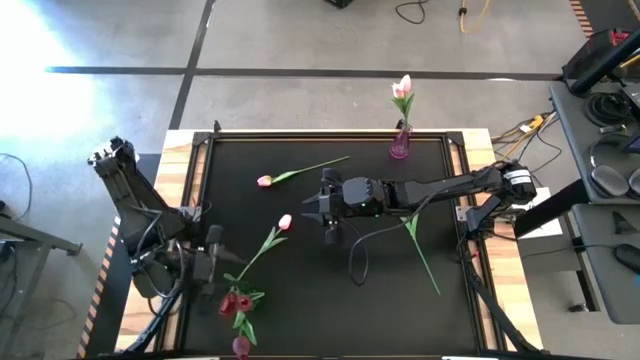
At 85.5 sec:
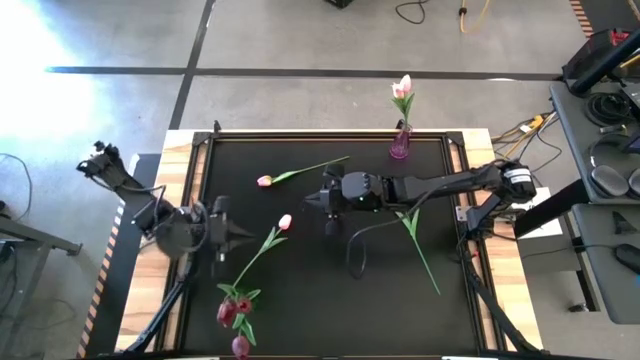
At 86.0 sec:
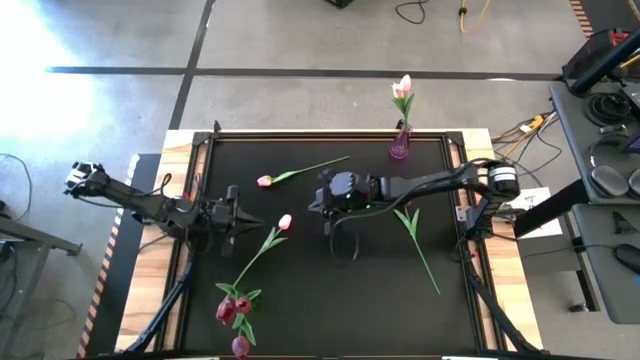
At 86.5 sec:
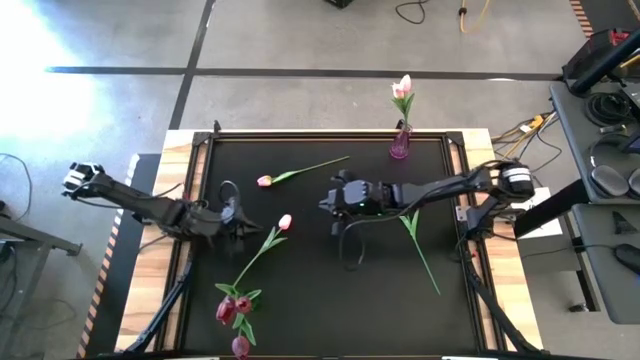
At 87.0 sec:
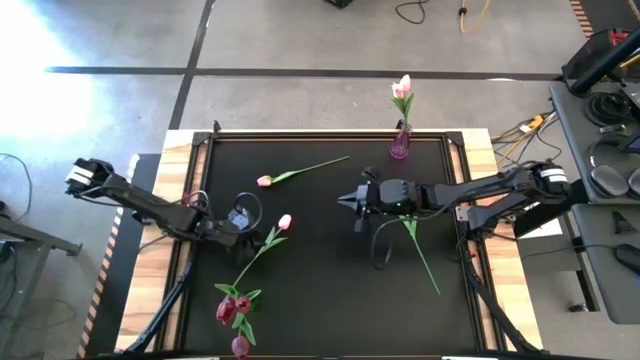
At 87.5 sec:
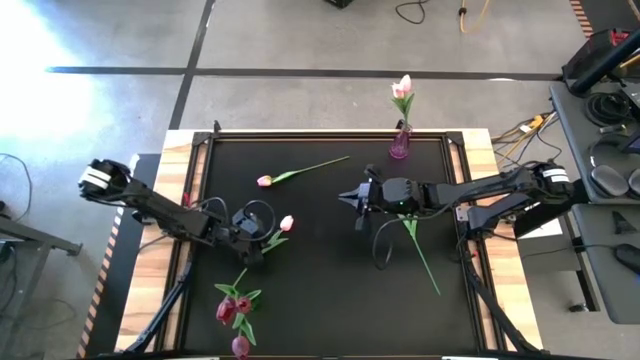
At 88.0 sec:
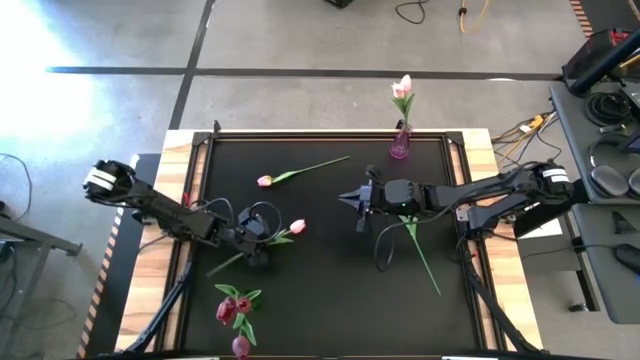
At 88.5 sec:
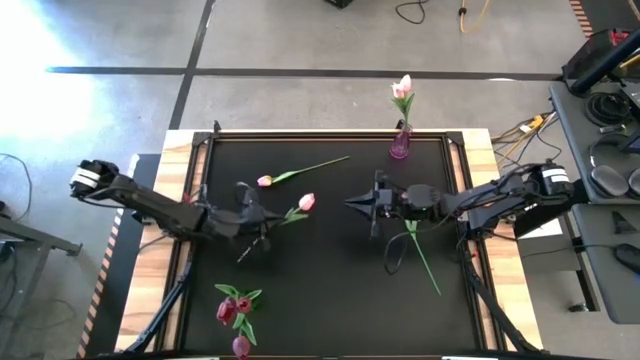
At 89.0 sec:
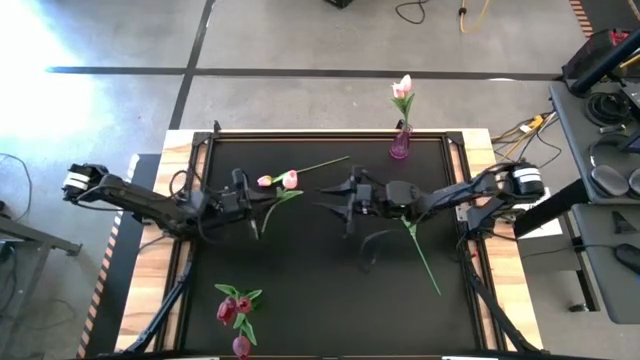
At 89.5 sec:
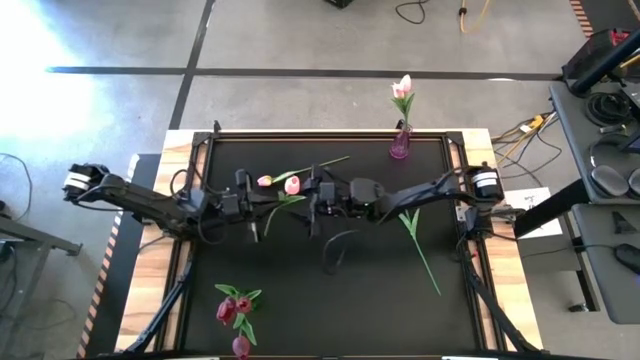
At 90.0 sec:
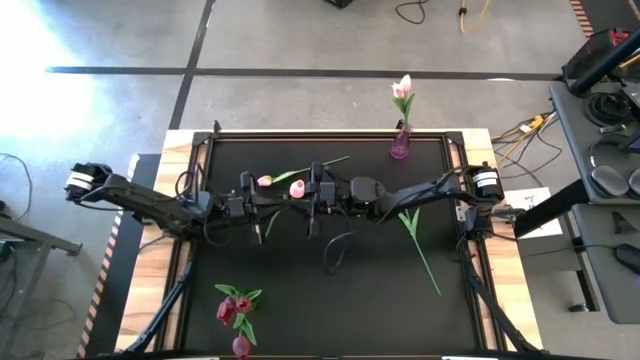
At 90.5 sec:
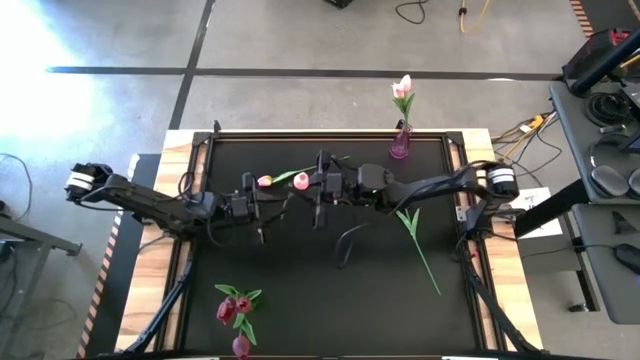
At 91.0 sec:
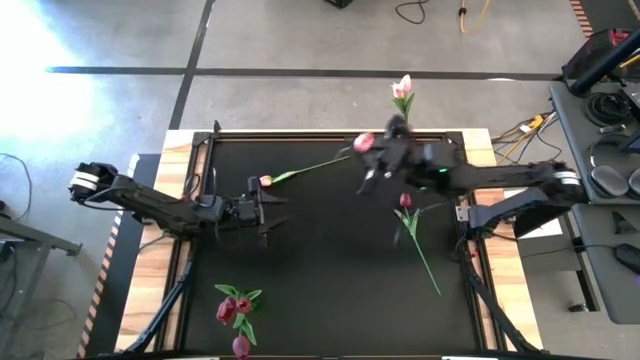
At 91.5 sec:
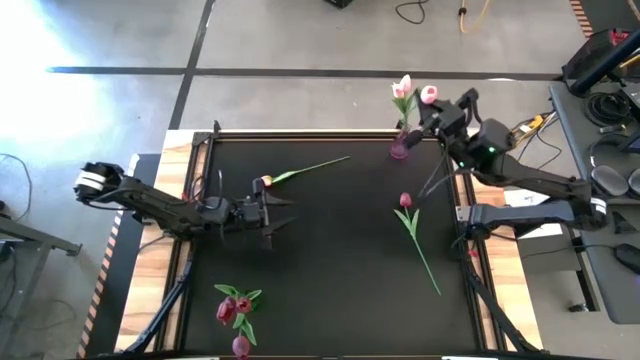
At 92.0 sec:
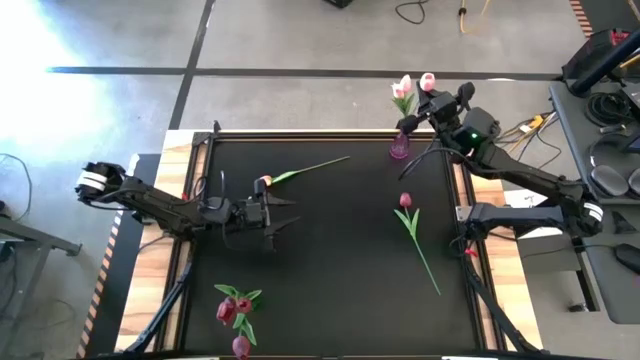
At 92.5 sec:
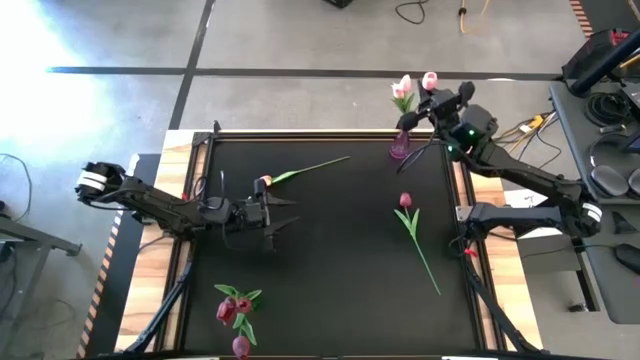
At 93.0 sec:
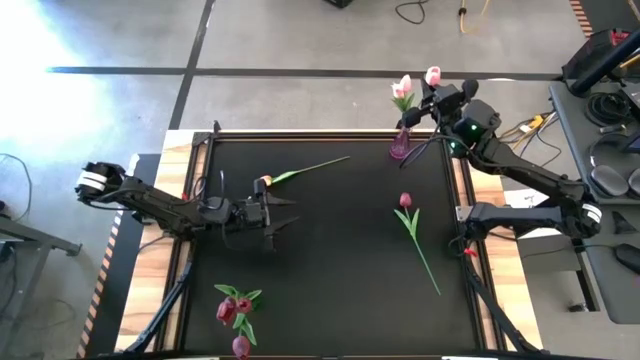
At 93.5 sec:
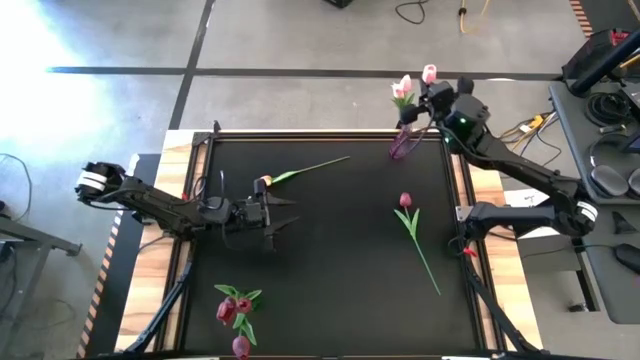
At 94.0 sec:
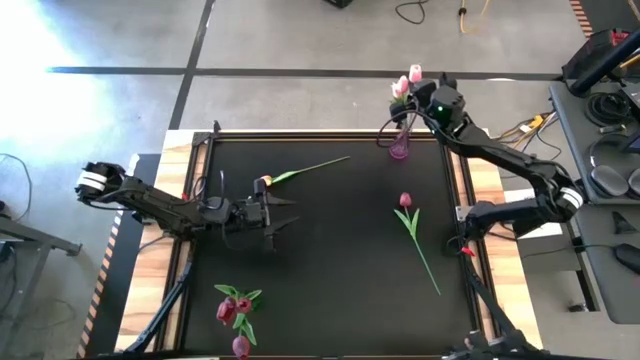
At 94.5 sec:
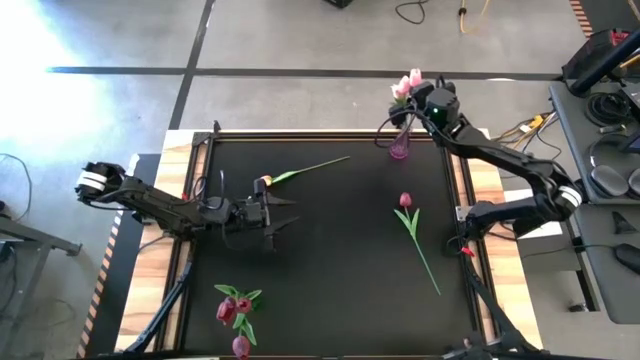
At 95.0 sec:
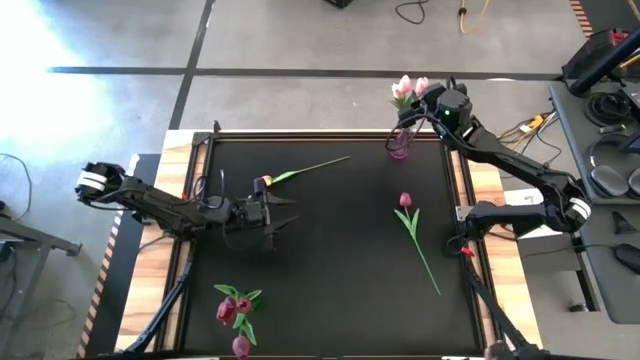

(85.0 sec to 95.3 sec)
Task: Sort flowers into vase by color
Put the pink flower into the violet vase

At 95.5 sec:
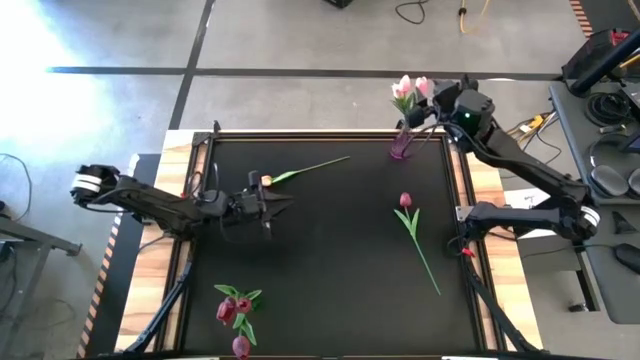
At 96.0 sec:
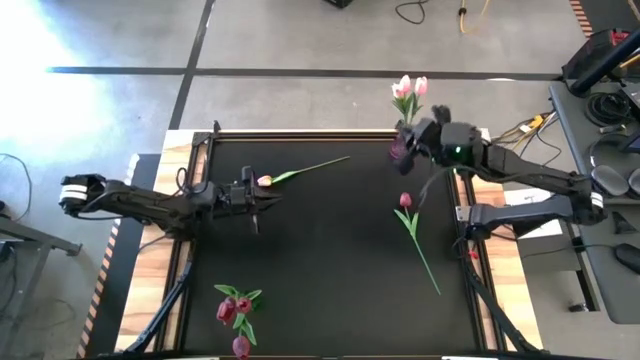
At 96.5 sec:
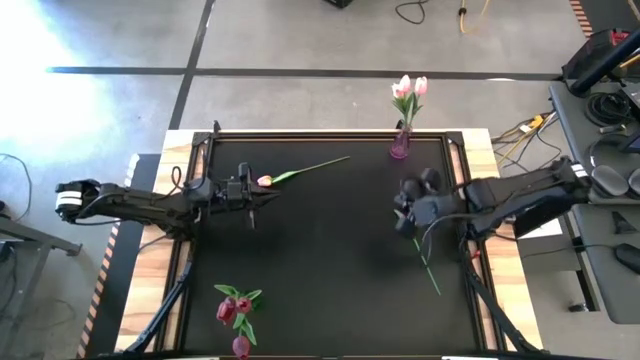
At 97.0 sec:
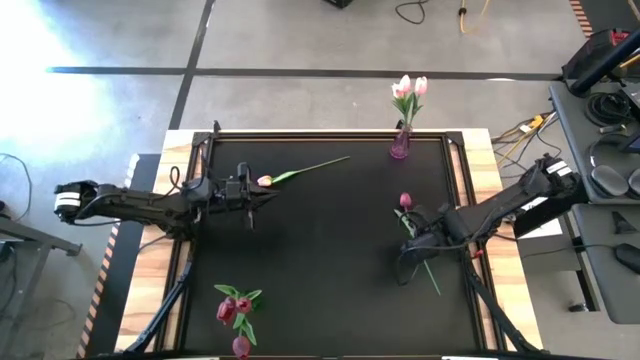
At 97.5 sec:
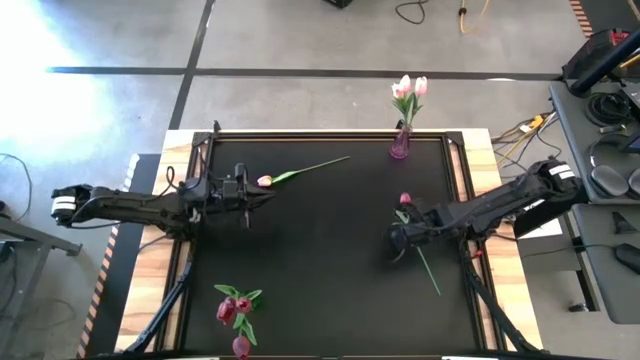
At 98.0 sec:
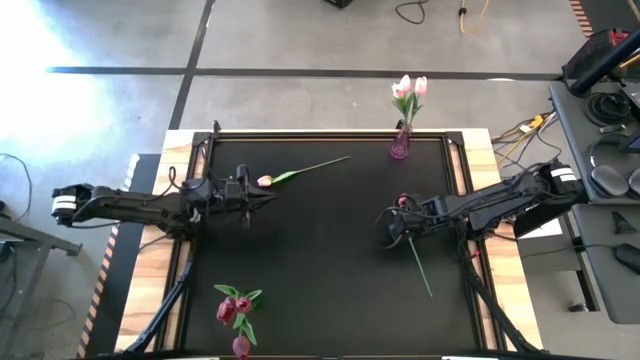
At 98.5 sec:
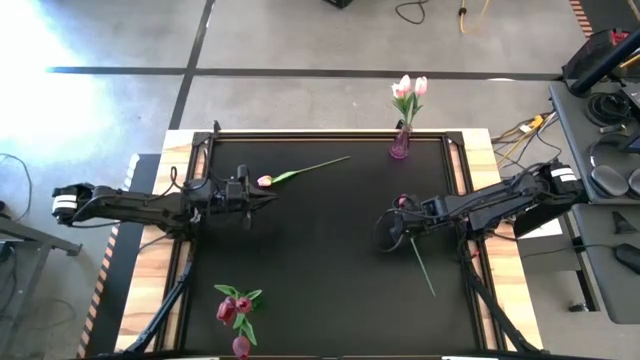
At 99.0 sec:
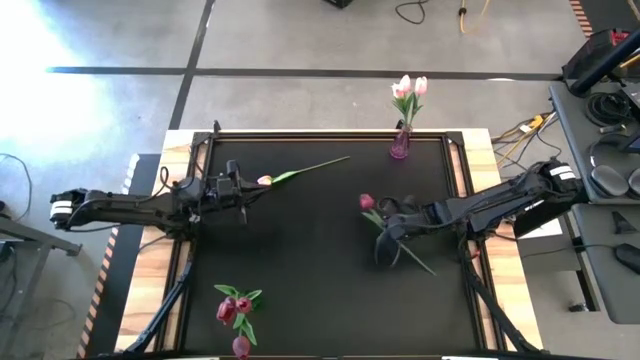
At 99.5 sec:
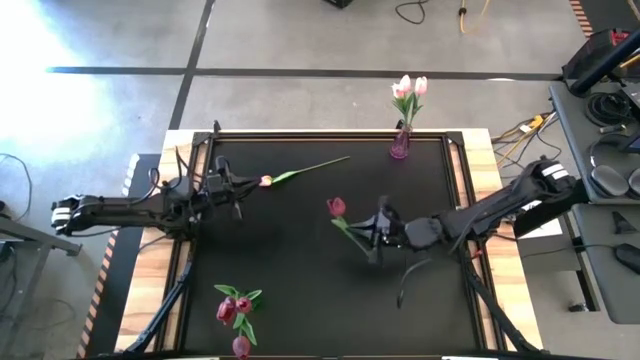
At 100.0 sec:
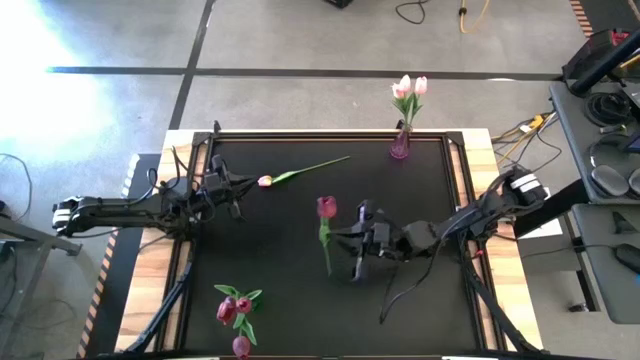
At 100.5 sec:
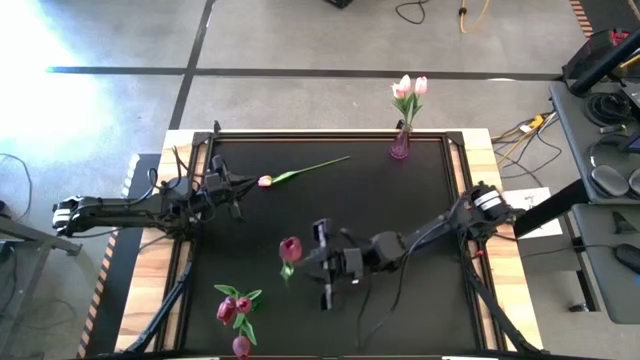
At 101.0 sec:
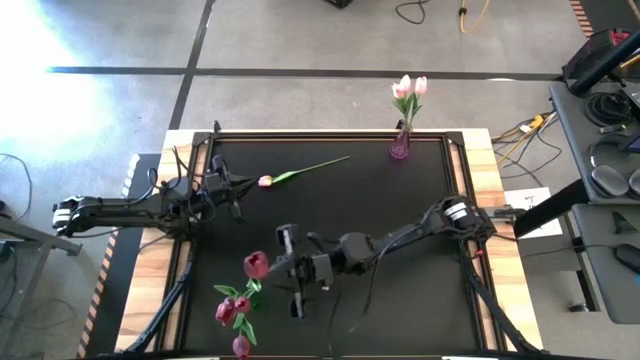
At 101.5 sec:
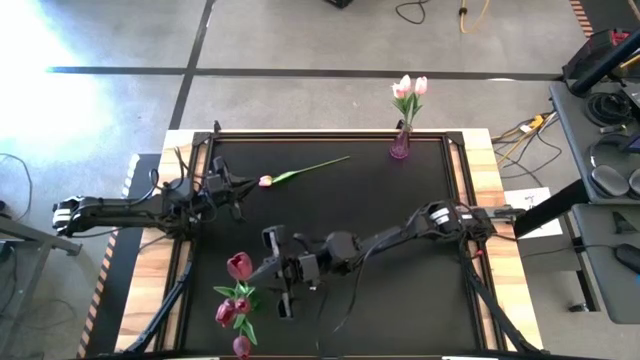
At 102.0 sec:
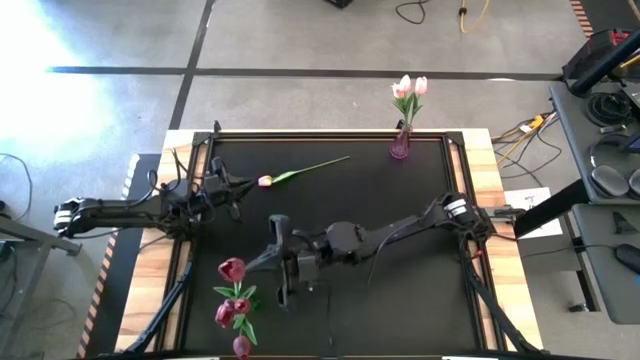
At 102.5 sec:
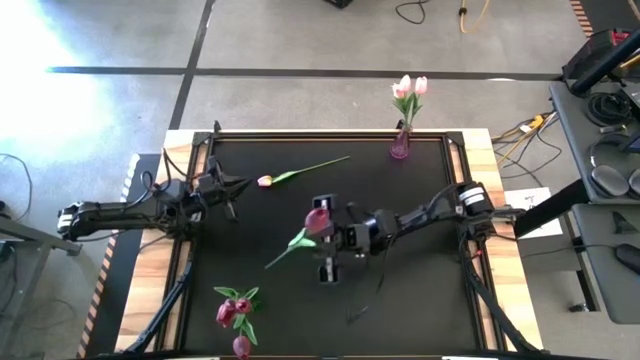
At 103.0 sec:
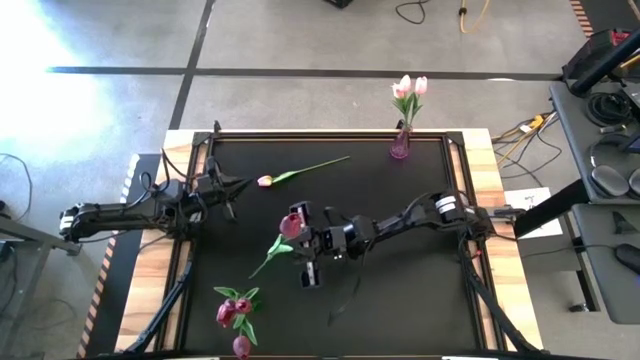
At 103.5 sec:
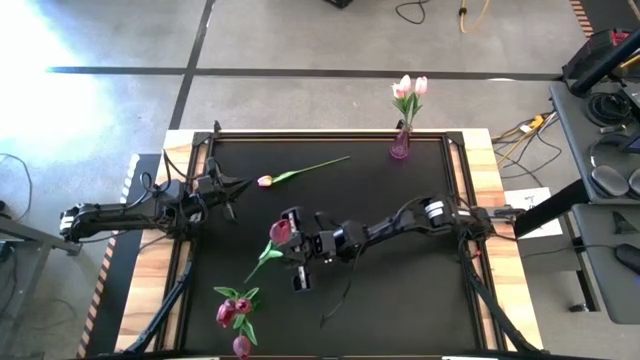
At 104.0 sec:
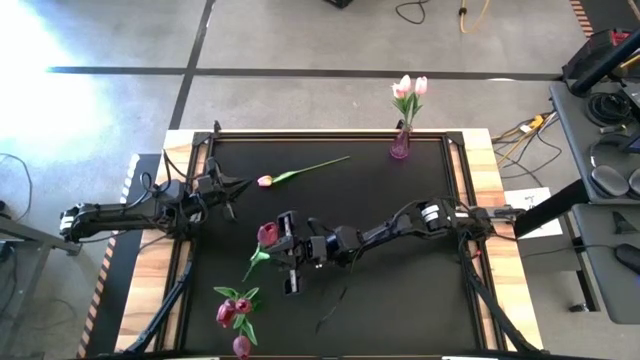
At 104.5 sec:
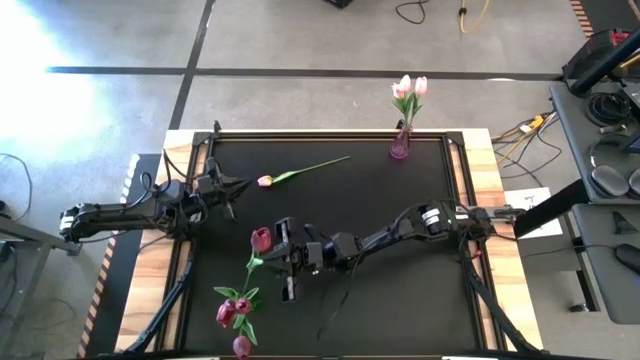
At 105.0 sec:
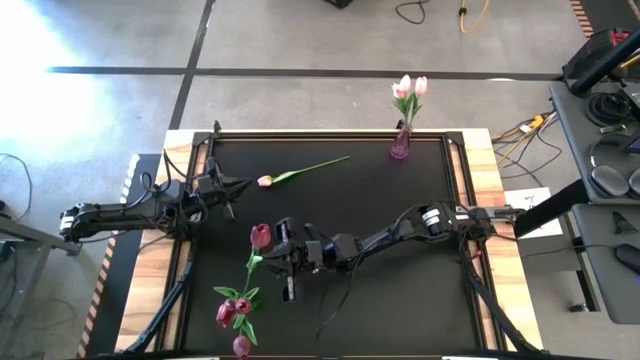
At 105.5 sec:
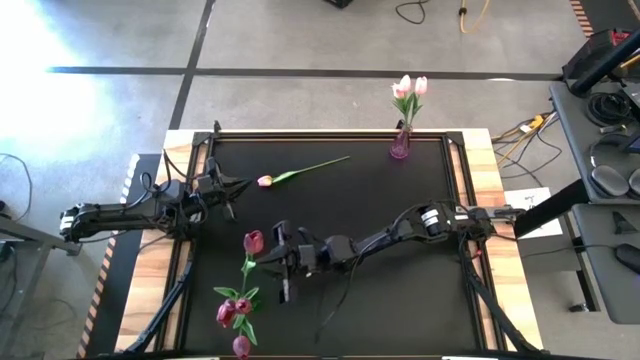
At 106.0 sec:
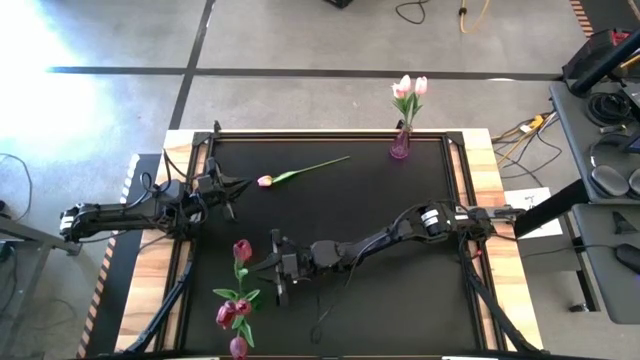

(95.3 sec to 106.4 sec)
Put the red flower into the green vase
